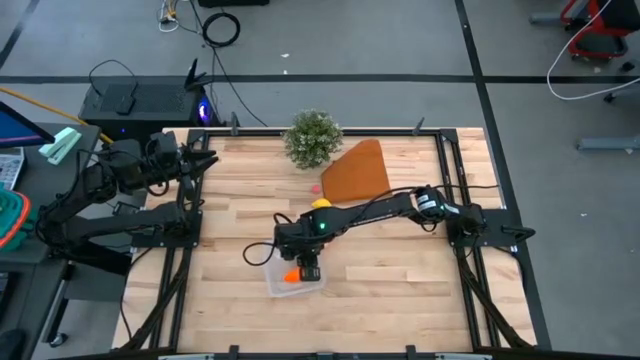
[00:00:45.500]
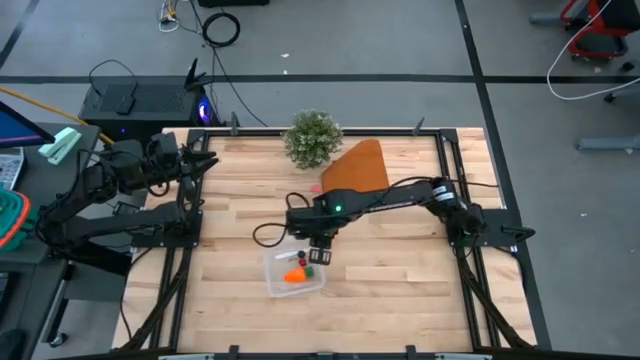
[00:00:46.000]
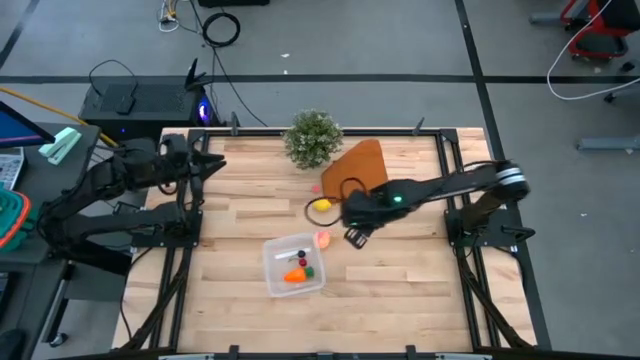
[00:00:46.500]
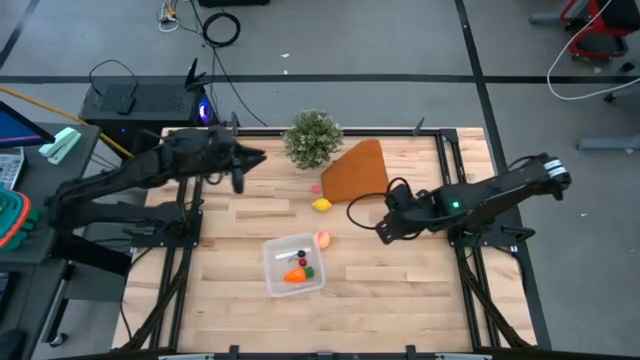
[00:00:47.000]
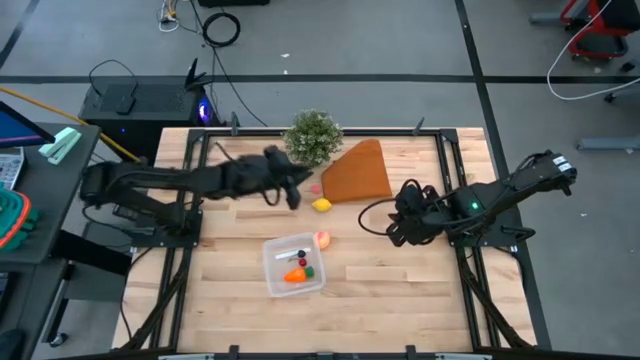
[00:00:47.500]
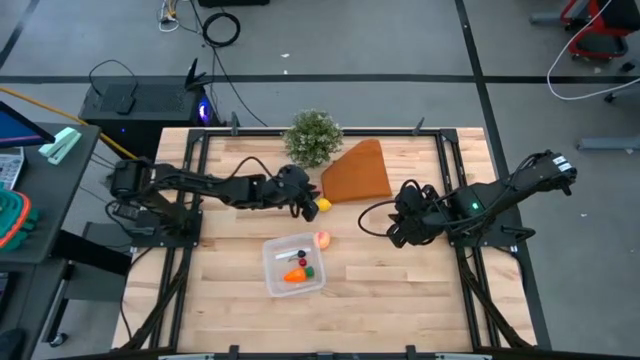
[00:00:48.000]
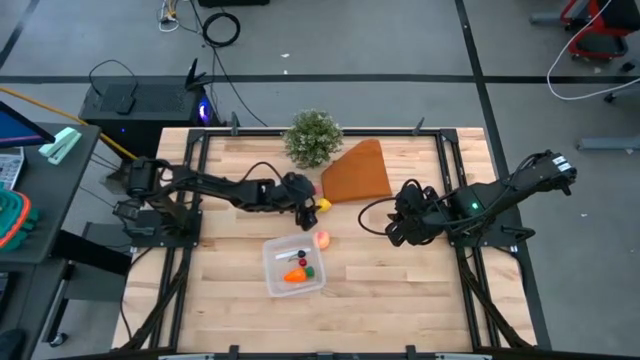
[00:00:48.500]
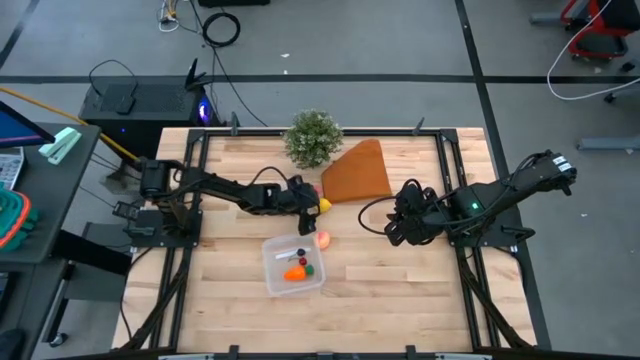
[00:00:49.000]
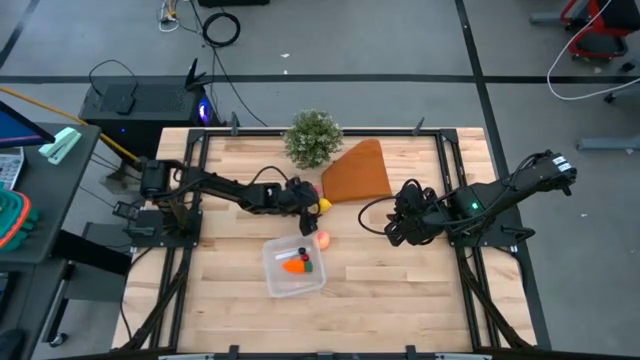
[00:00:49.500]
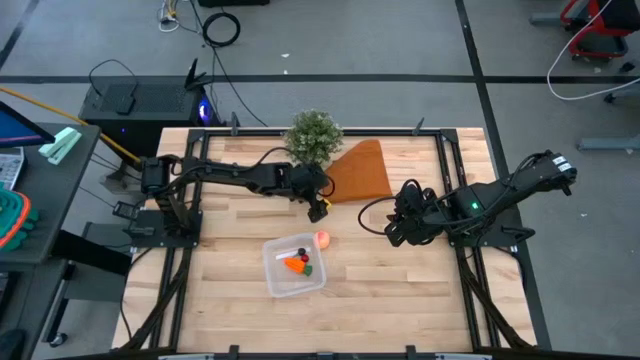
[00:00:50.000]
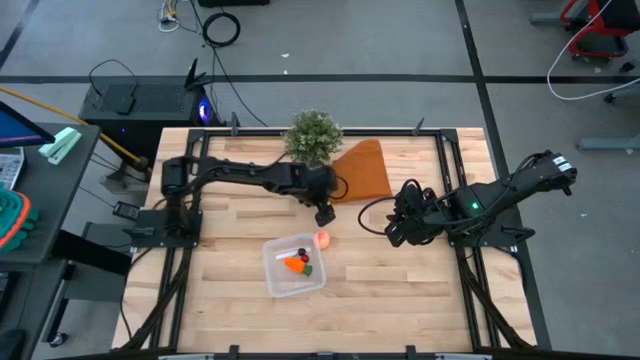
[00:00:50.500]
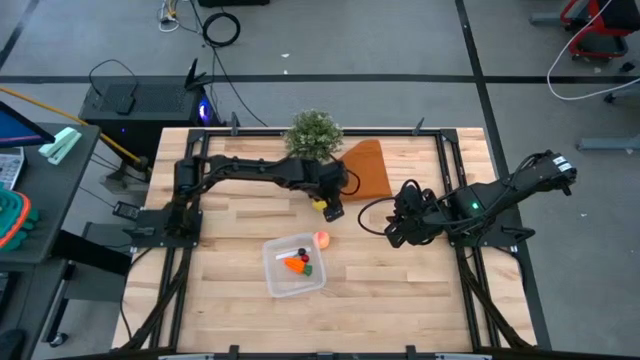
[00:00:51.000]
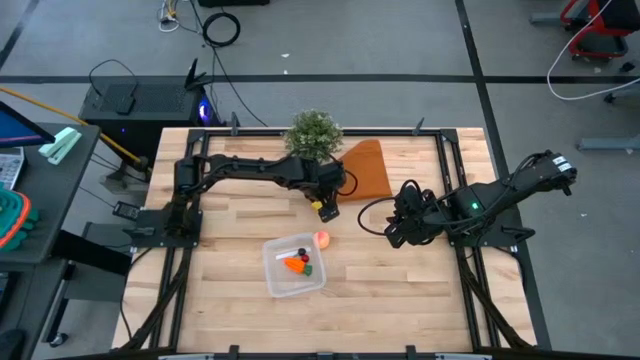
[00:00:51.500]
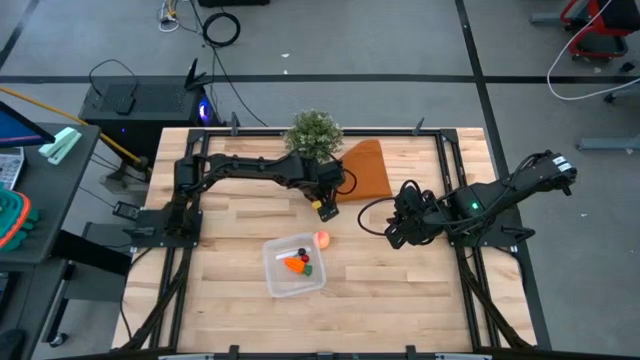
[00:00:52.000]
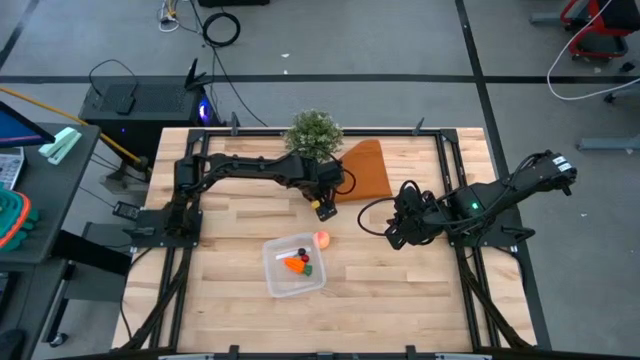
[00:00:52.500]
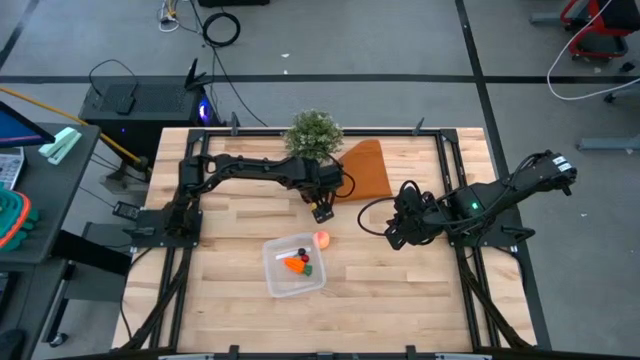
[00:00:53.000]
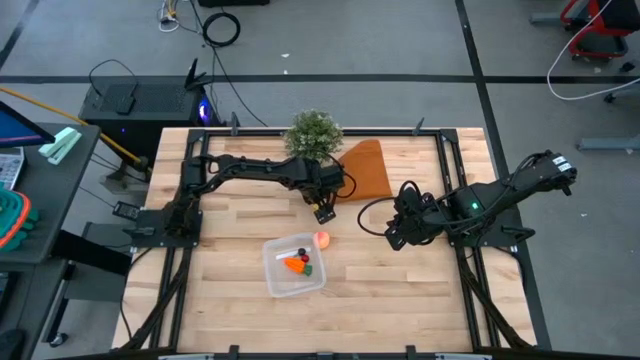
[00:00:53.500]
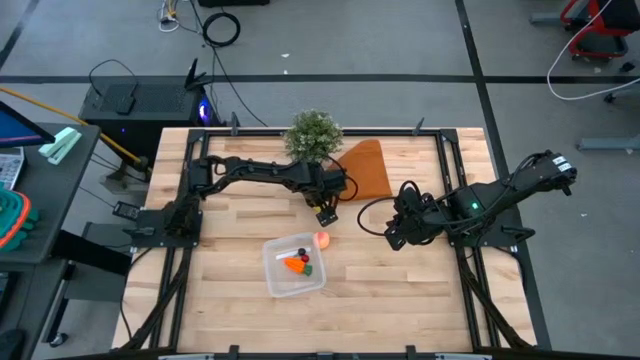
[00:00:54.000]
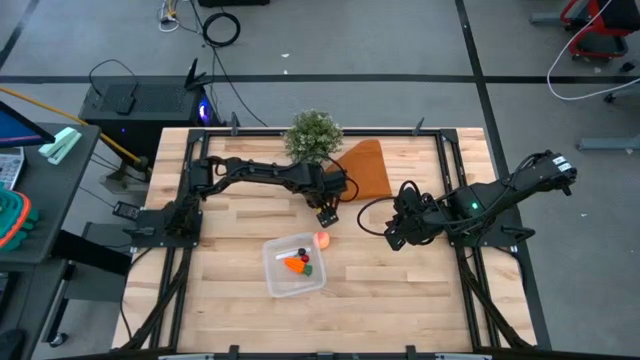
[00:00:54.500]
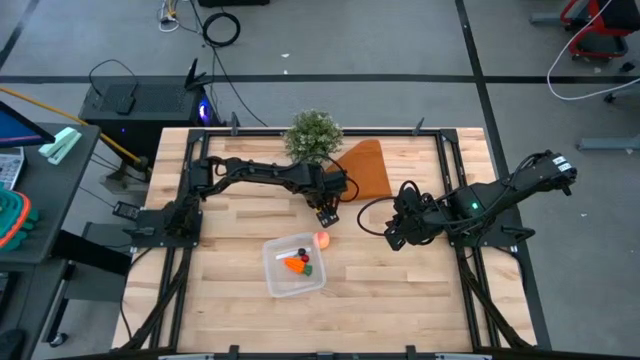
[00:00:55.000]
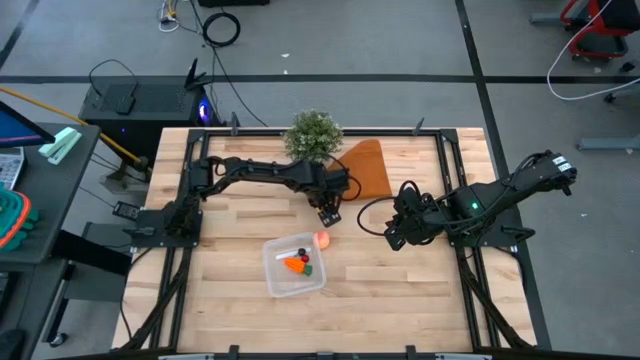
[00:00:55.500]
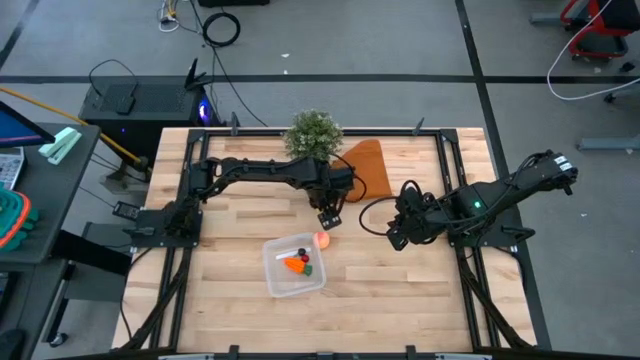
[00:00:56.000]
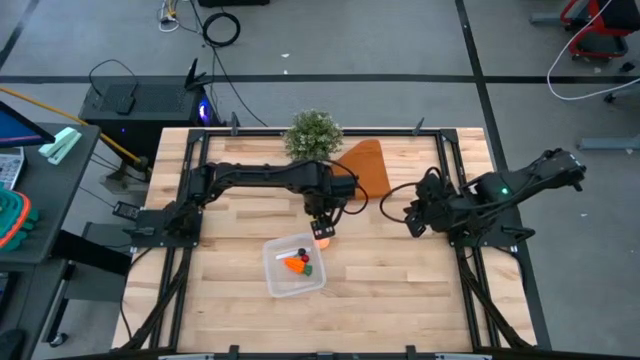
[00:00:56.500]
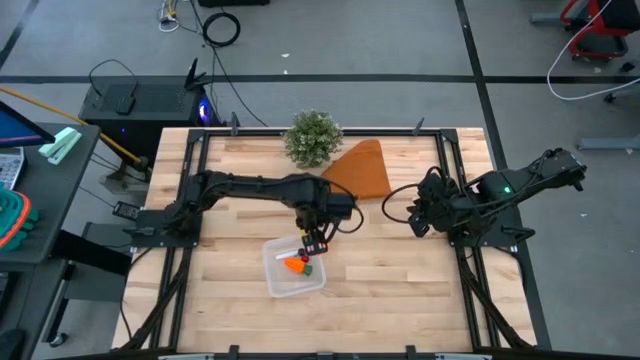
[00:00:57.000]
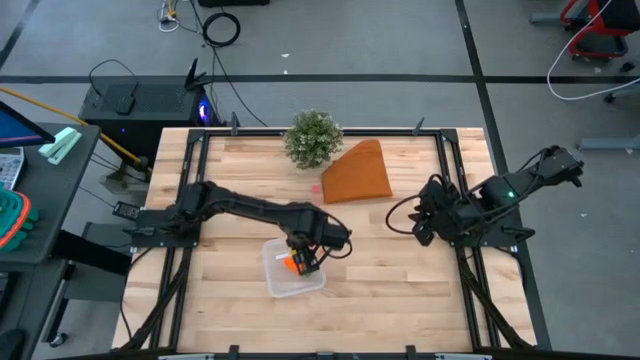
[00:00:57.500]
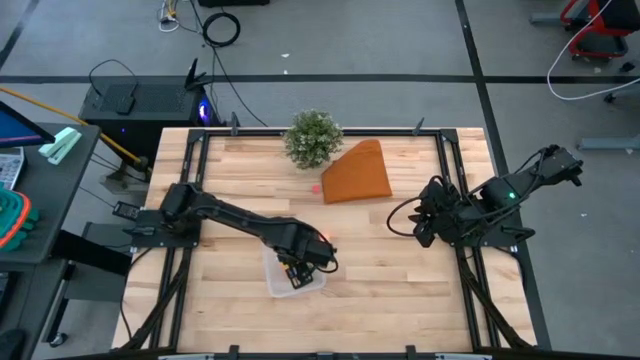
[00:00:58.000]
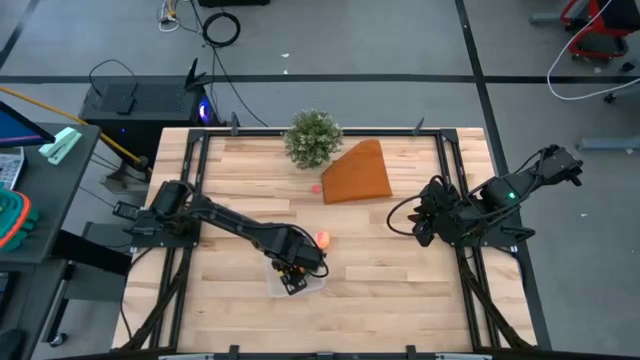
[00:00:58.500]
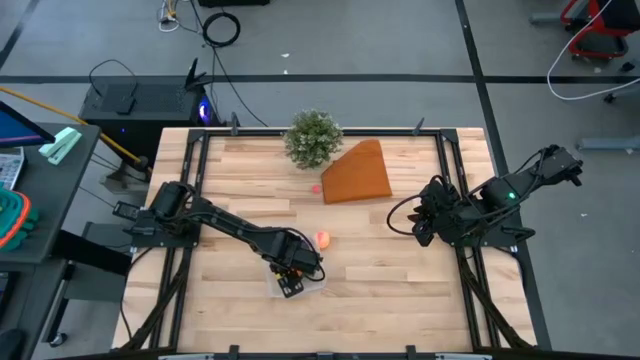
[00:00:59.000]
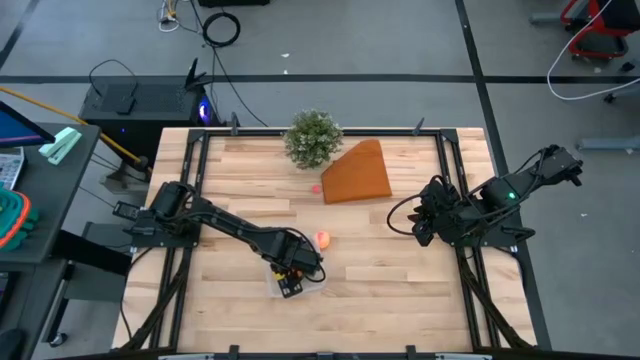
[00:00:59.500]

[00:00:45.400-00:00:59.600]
Task: Pick and placing Produce into tupperware
Put the yellow lemon into the transparent bin

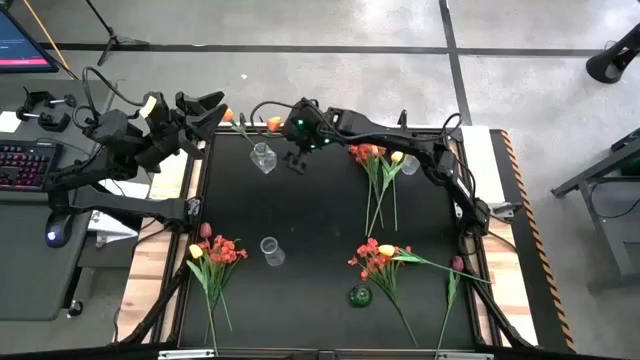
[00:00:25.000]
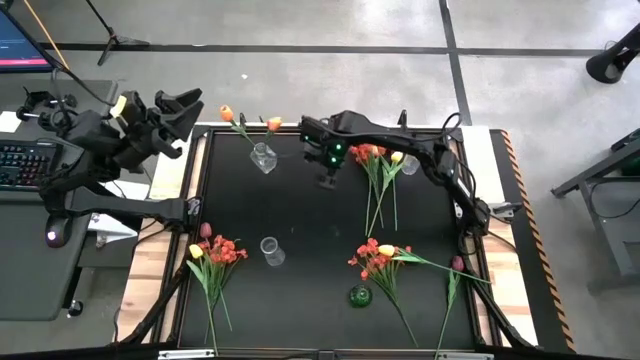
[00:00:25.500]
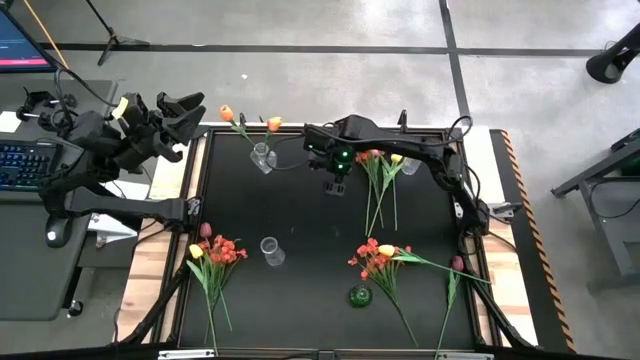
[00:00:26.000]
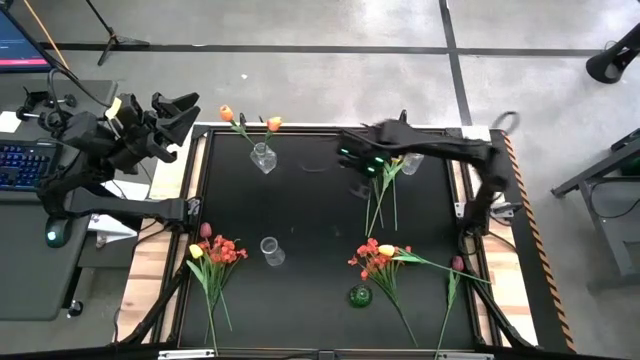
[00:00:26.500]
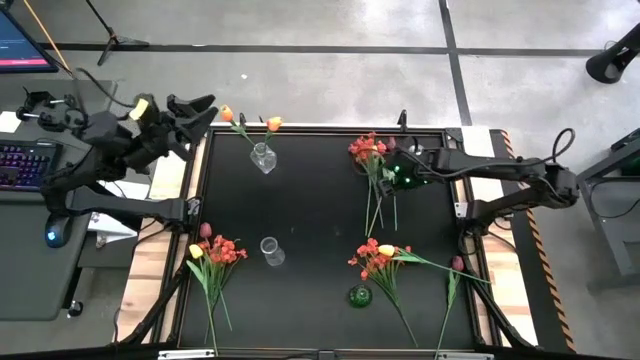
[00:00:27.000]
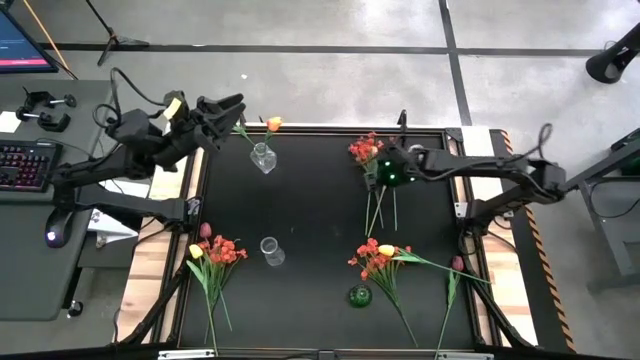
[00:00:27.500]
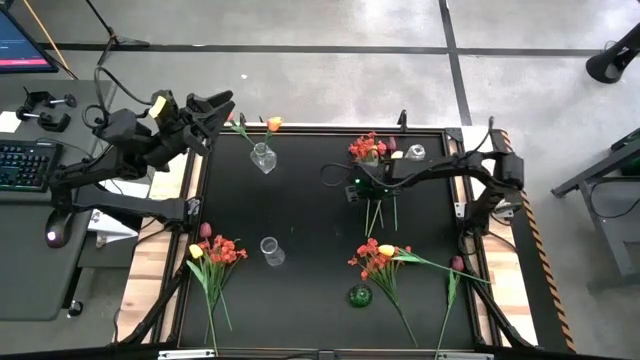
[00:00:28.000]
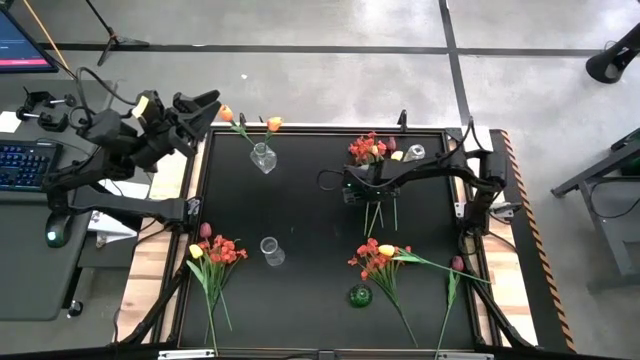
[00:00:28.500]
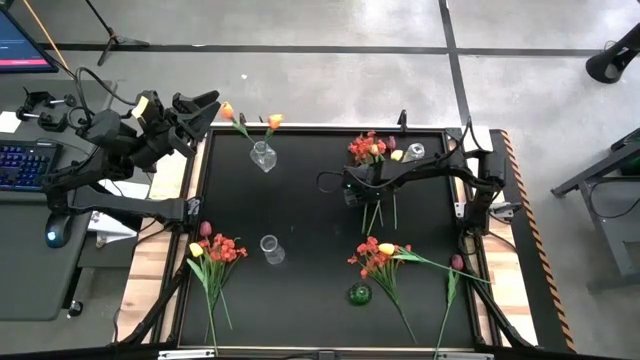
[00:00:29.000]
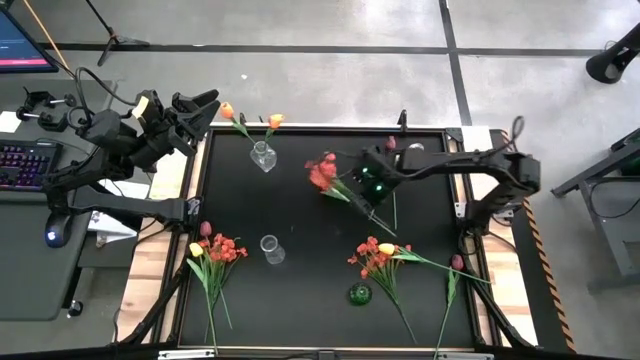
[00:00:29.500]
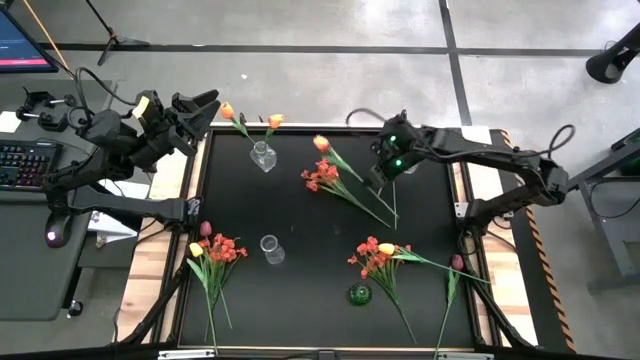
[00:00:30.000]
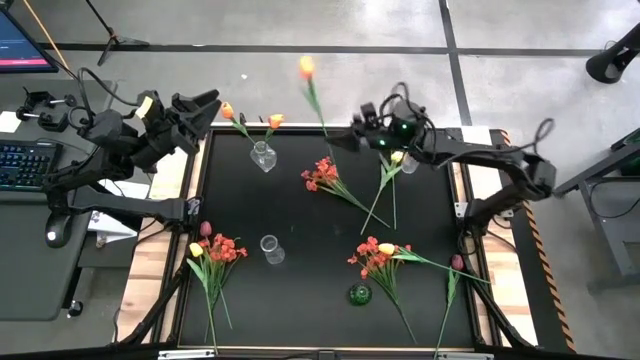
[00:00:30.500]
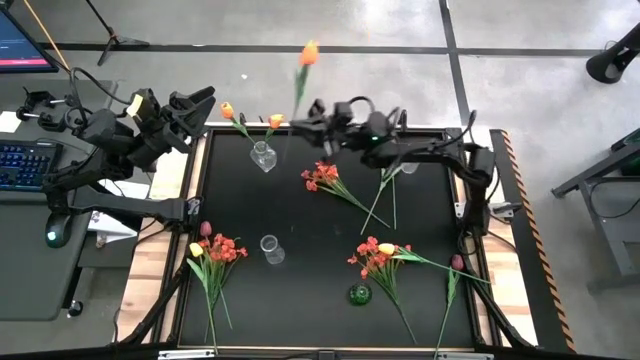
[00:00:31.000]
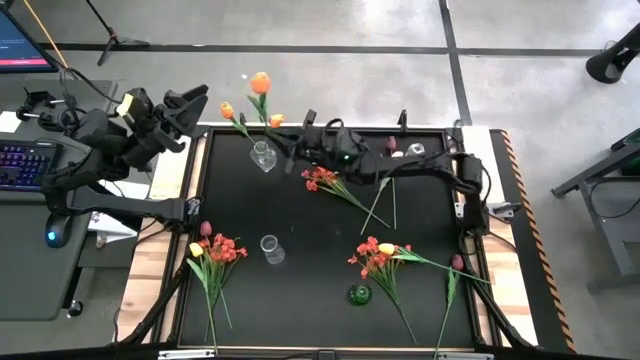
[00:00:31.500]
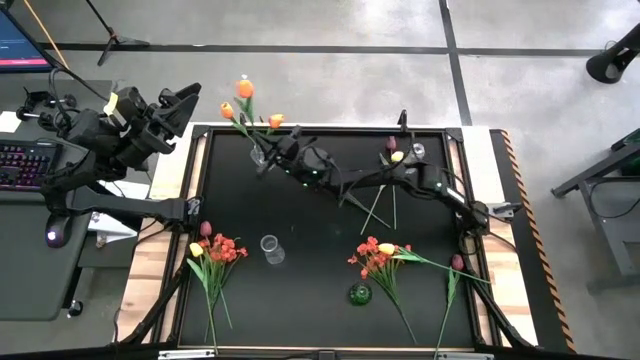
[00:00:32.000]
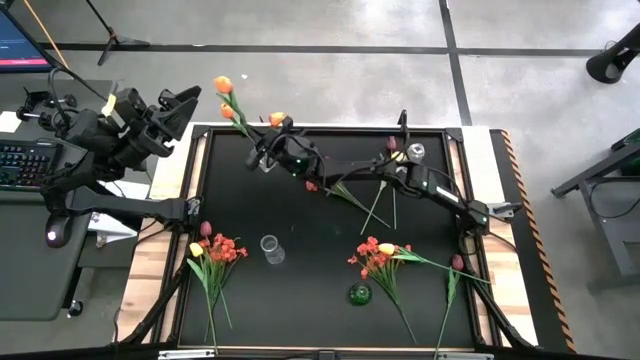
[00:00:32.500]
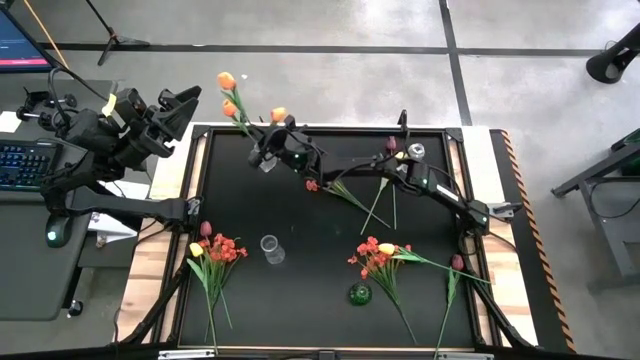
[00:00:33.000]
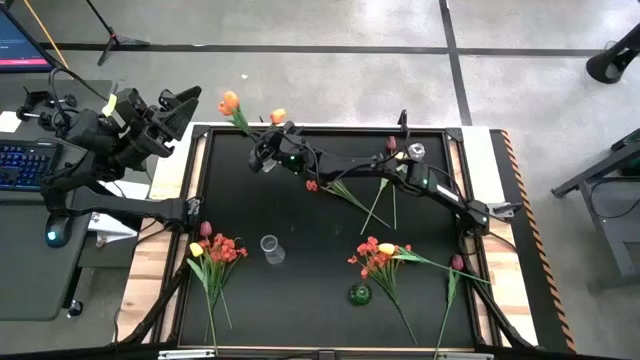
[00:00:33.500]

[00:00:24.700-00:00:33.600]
Task: Sort flowers into vase by color
Put the orange flower into the top left transparent vase
